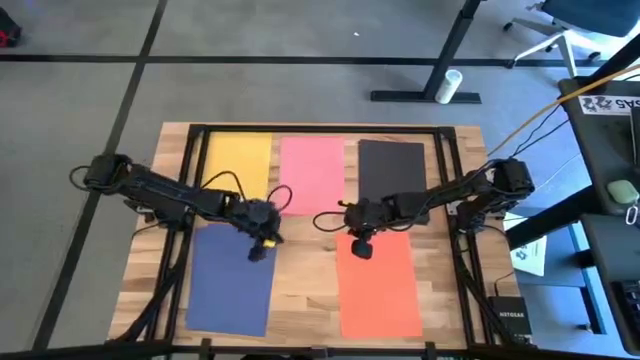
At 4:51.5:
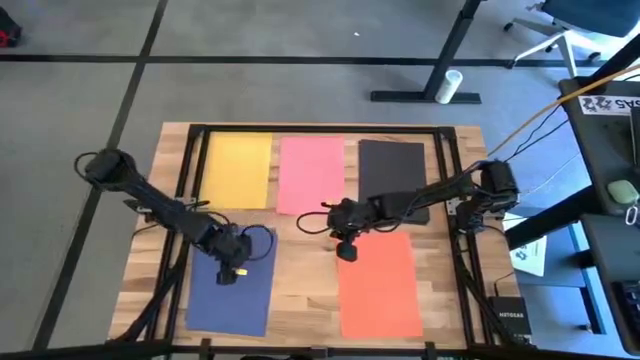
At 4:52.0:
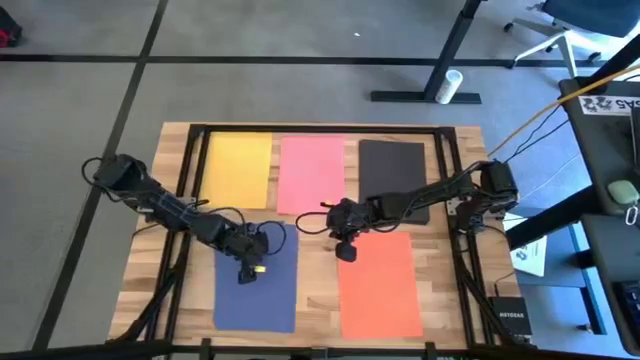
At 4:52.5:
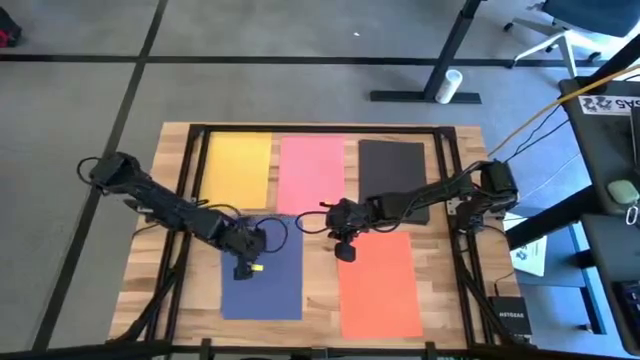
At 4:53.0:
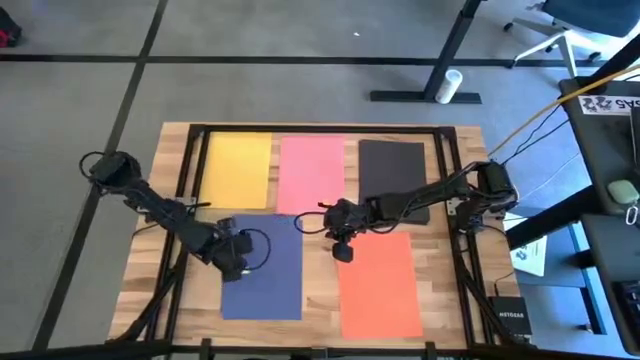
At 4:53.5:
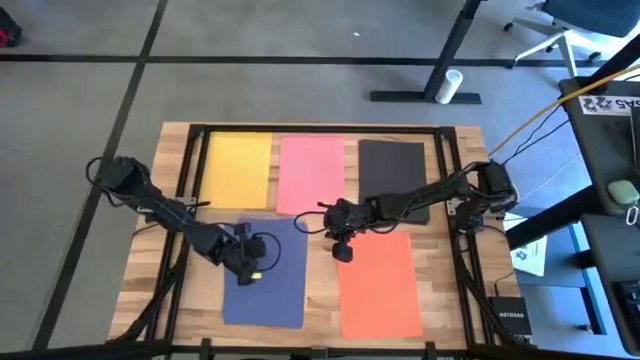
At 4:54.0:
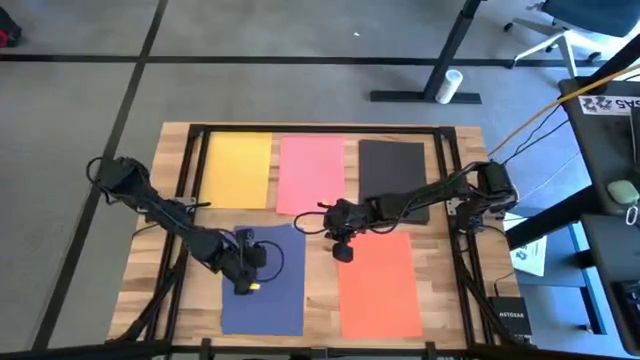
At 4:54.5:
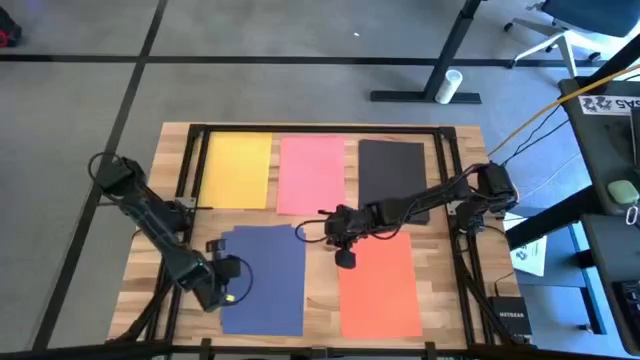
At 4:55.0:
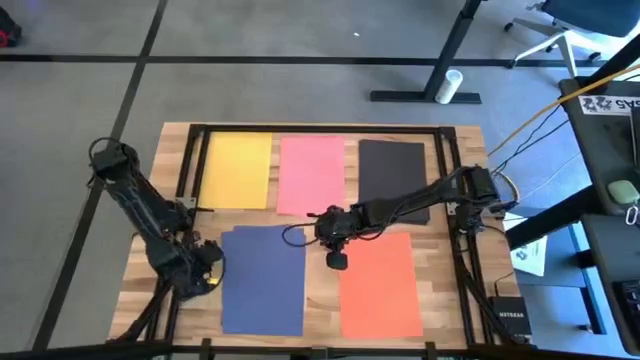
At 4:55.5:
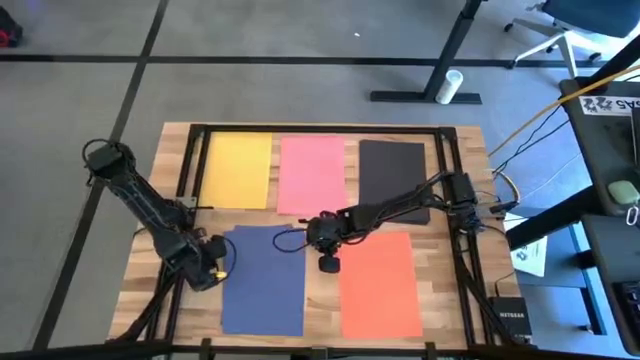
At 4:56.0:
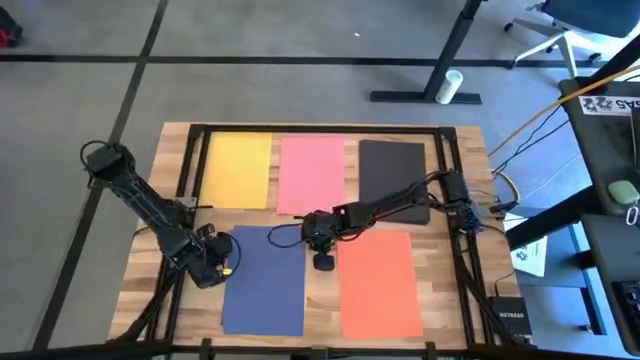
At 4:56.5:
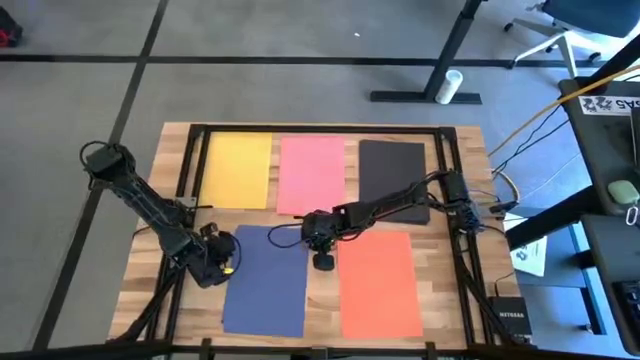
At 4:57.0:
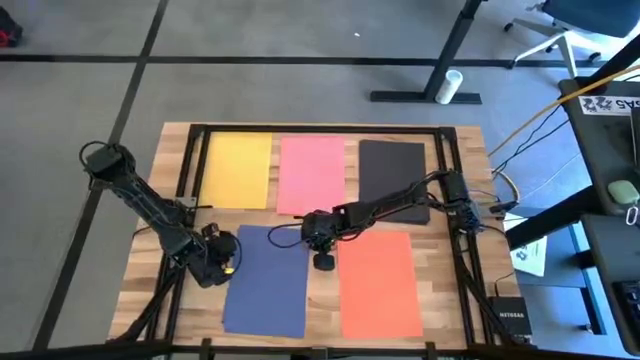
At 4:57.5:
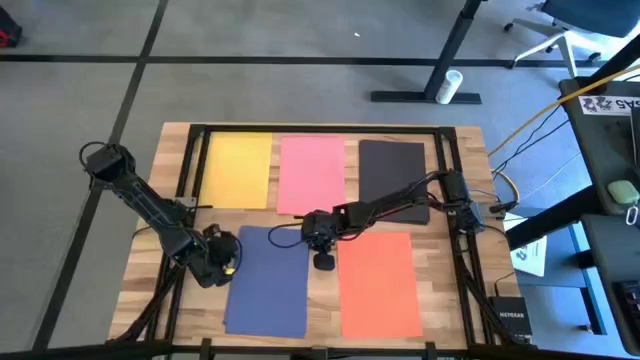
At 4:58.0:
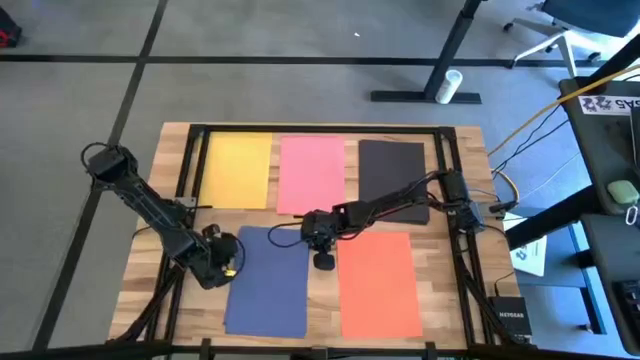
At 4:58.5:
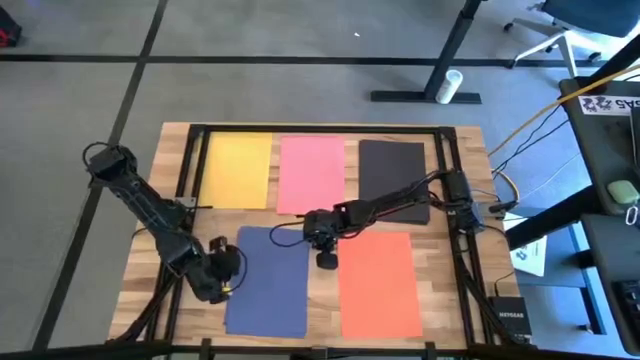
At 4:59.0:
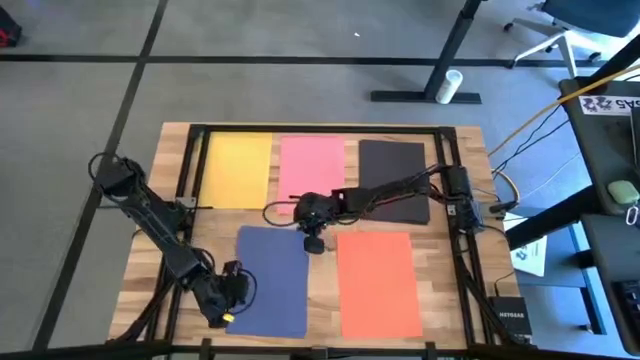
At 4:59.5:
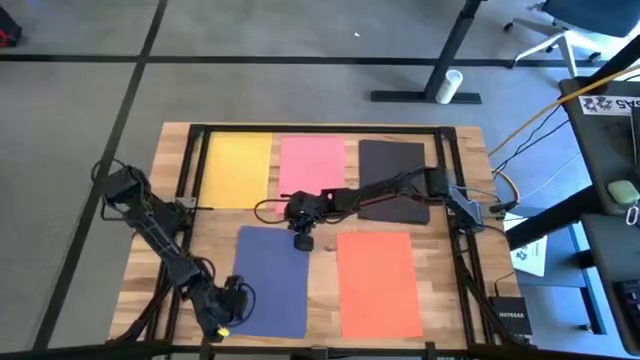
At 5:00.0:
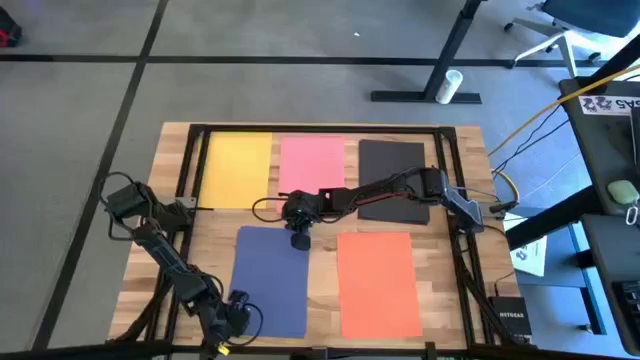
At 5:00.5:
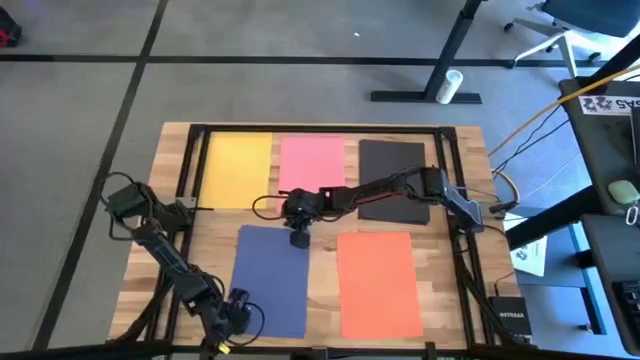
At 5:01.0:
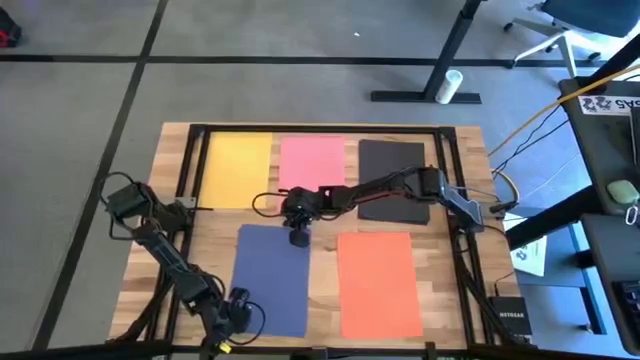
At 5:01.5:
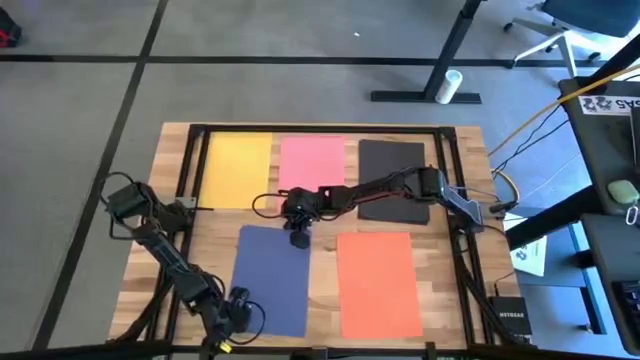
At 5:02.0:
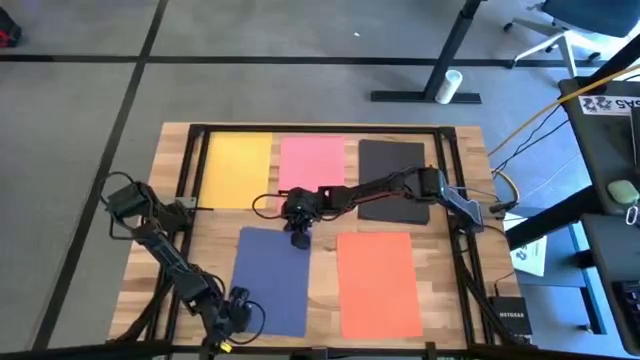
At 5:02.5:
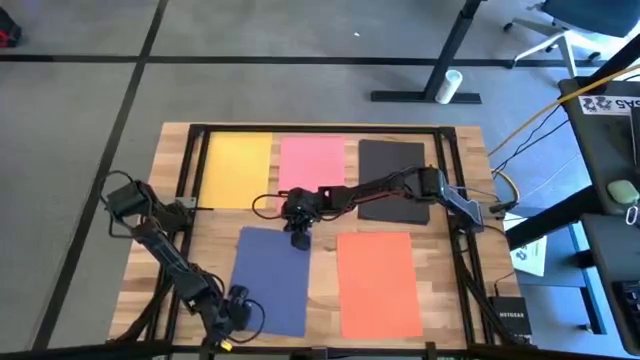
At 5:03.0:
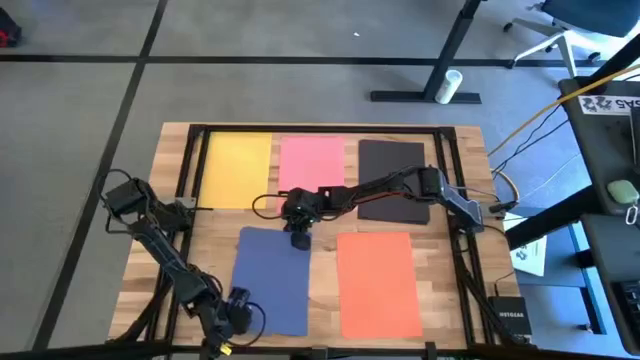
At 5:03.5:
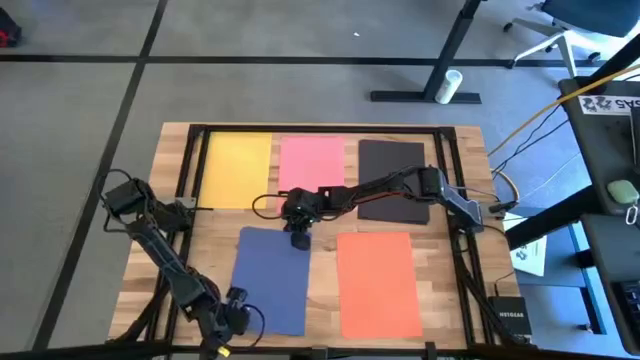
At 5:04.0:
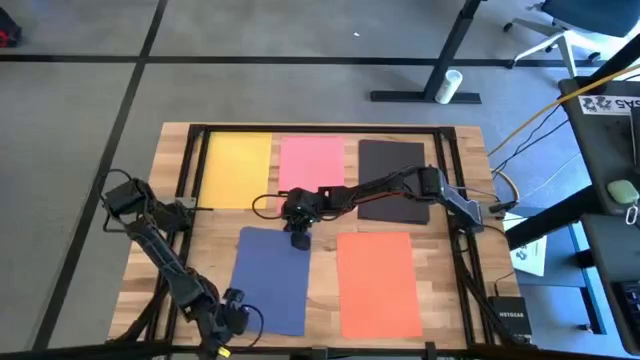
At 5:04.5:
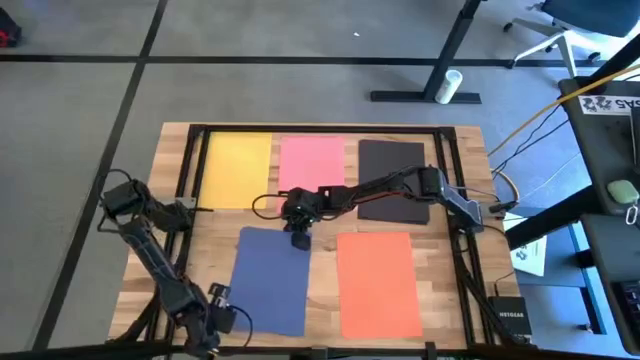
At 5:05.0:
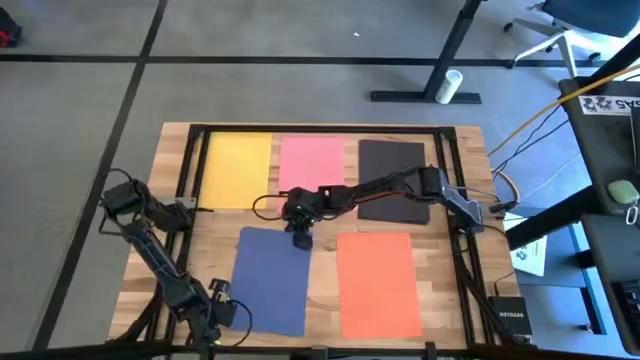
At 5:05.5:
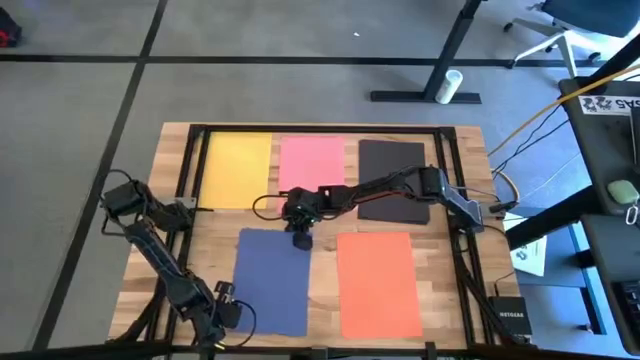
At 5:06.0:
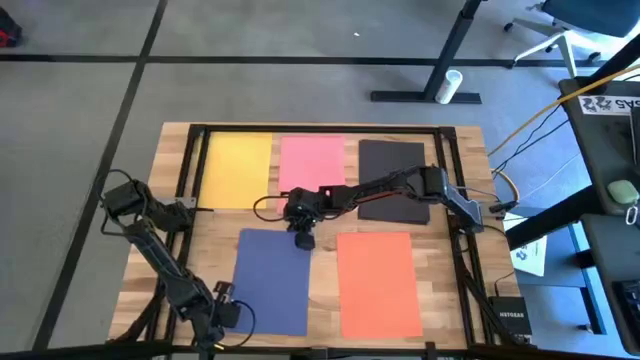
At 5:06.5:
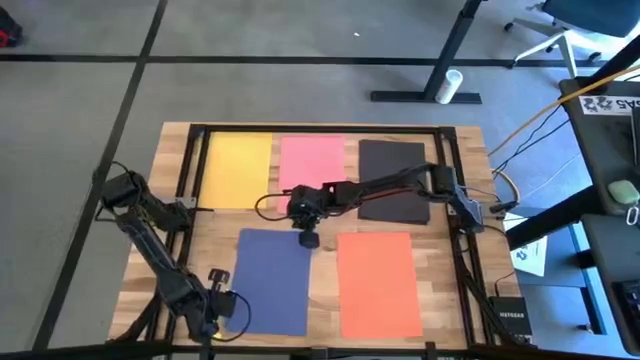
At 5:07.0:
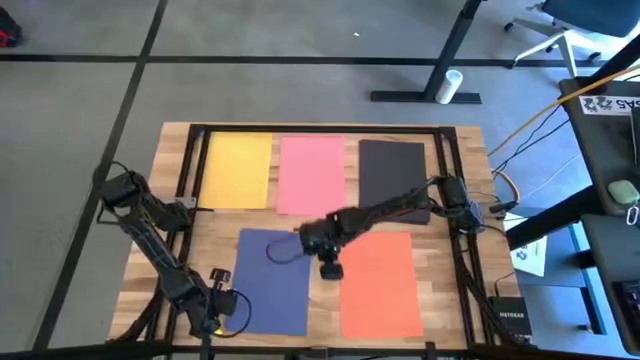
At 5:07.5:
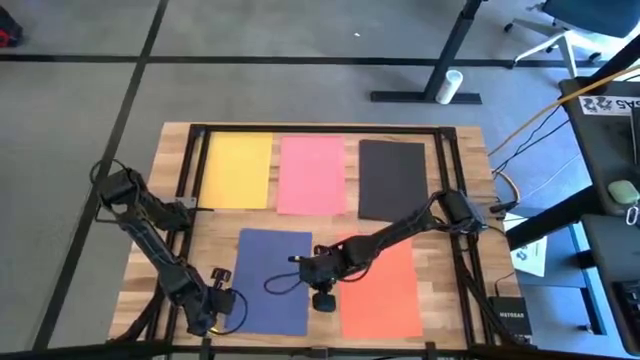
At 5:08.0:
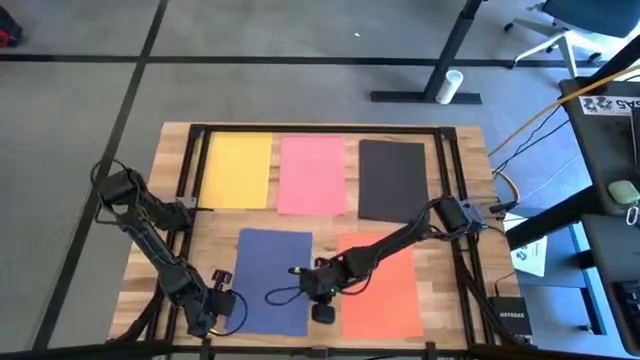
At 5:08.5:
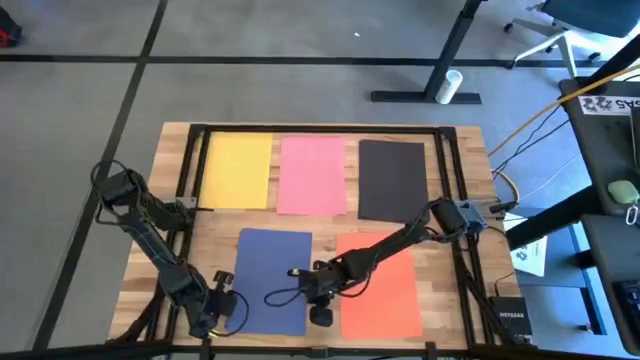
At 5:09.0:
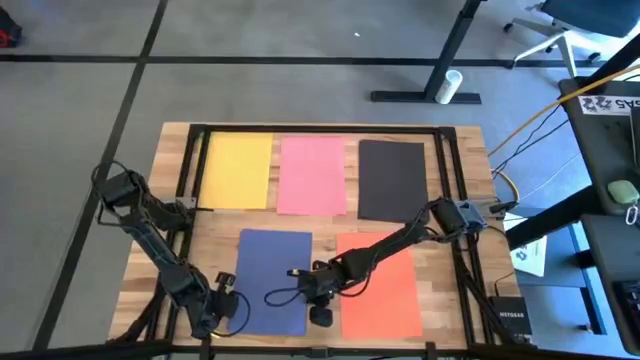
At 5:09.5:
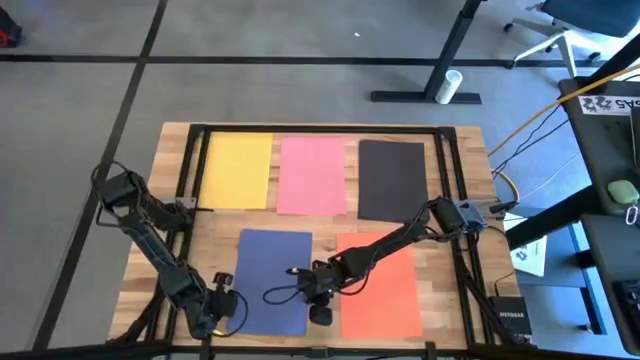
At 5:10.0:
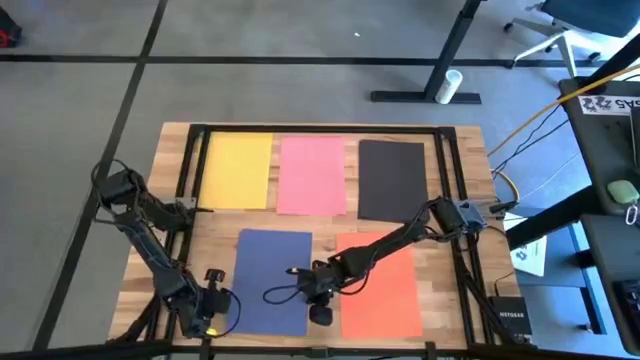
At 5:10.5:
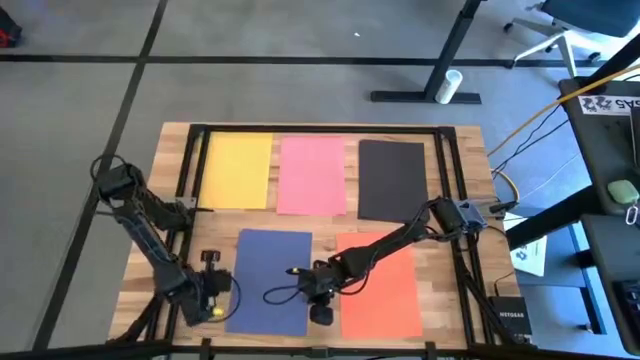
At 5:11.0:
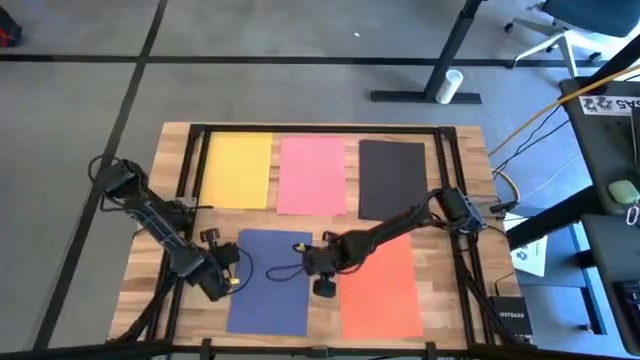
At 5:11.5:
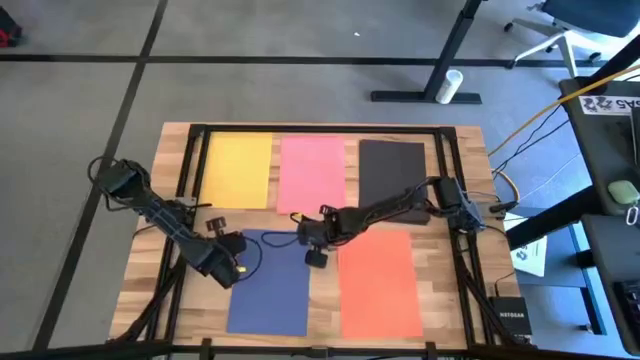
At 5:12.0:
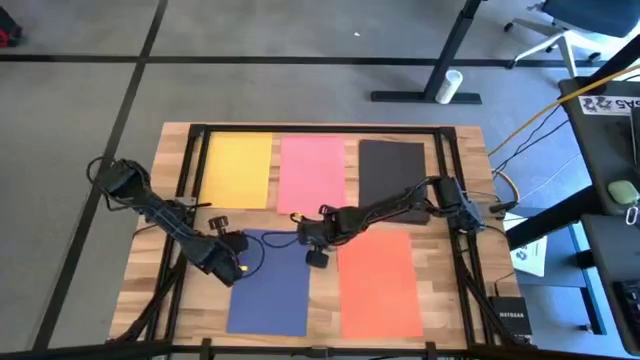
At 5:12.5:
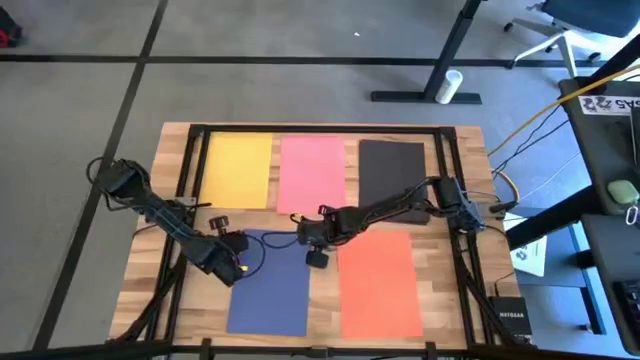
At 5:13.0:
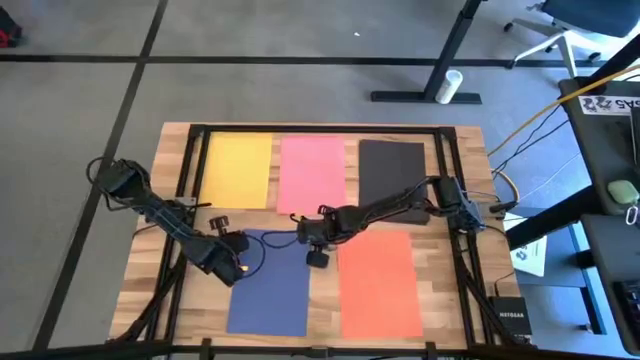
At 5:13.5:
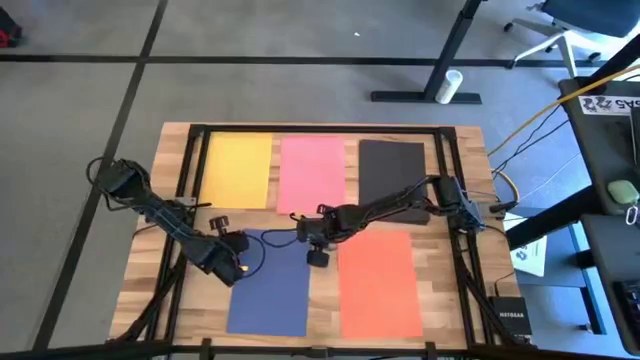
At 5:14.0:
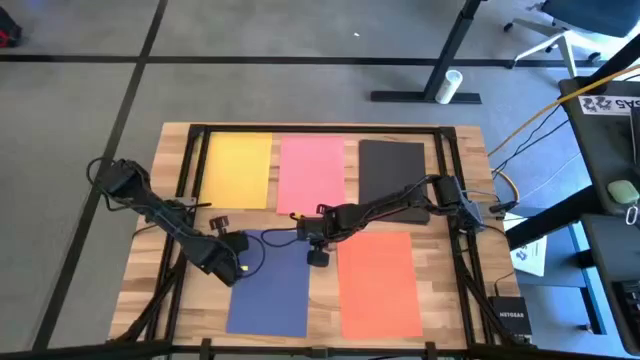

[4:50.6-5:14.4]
Task: Organize paper
Adjust the stacked violet papers
